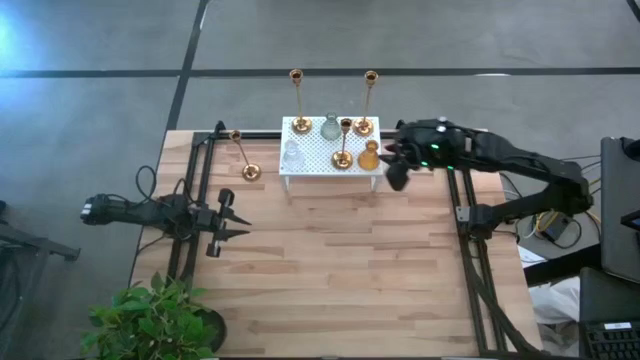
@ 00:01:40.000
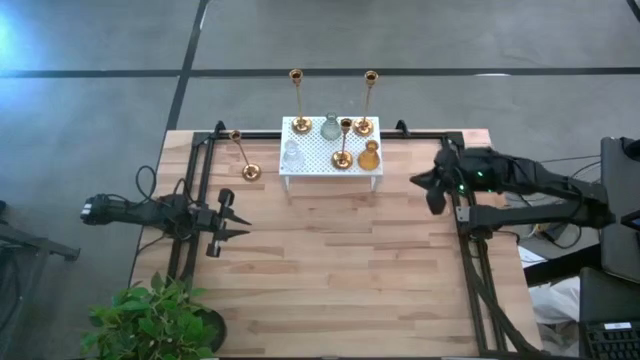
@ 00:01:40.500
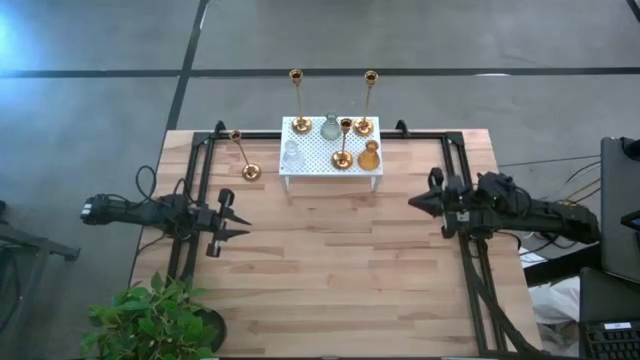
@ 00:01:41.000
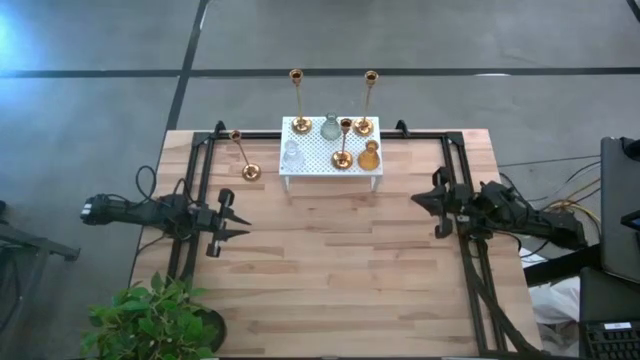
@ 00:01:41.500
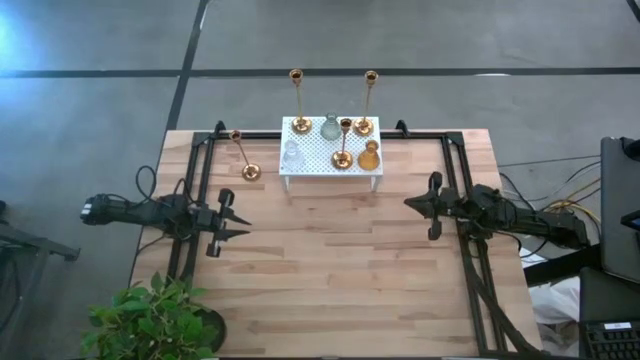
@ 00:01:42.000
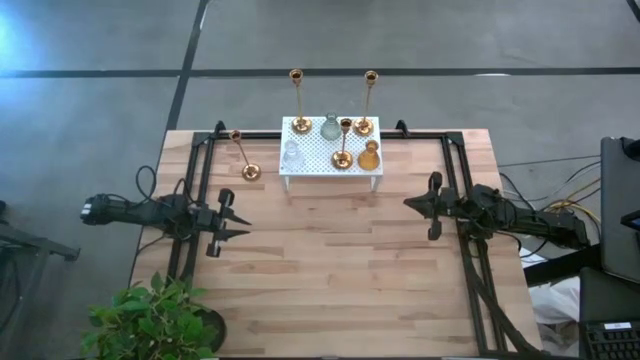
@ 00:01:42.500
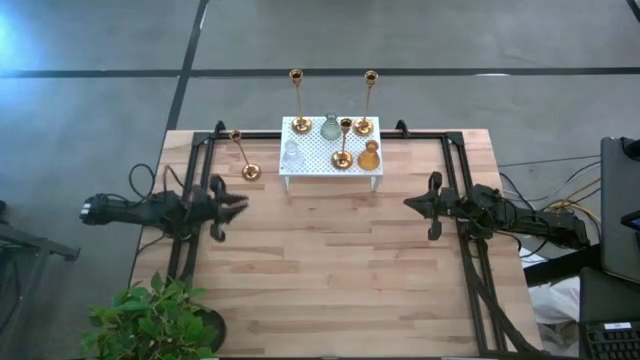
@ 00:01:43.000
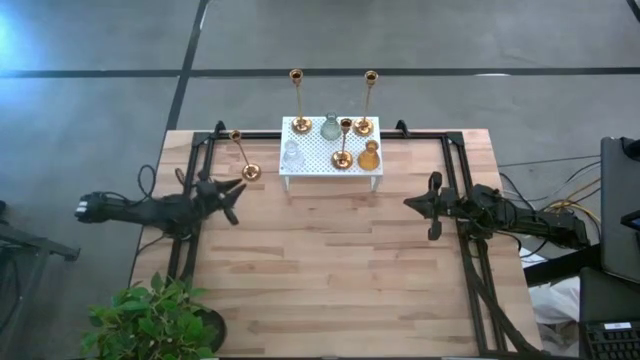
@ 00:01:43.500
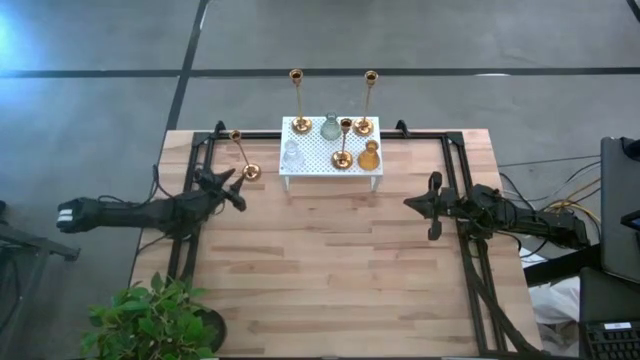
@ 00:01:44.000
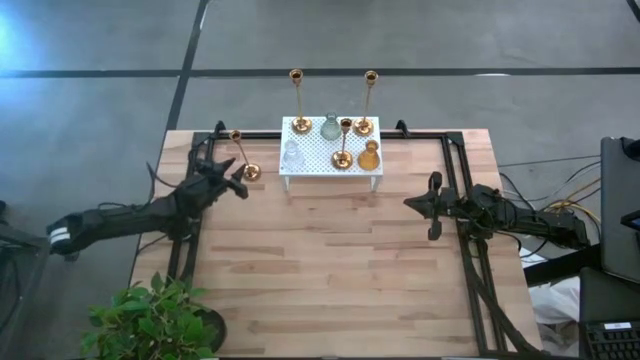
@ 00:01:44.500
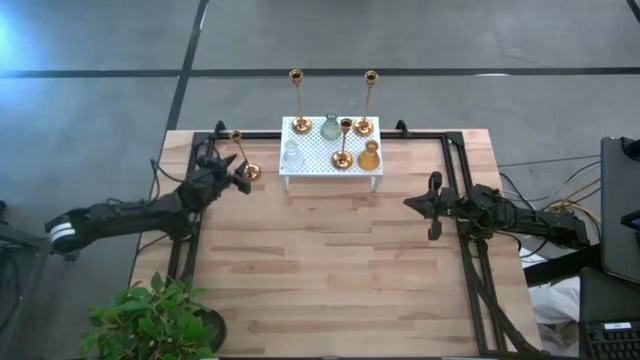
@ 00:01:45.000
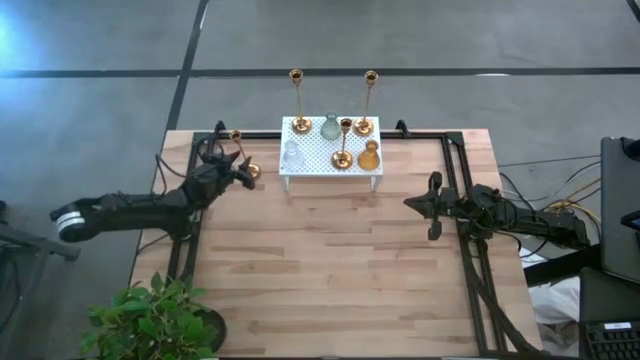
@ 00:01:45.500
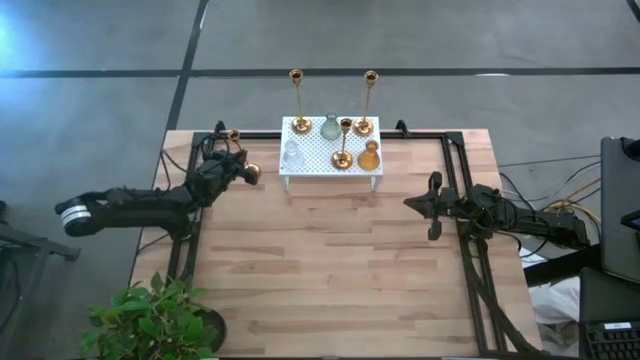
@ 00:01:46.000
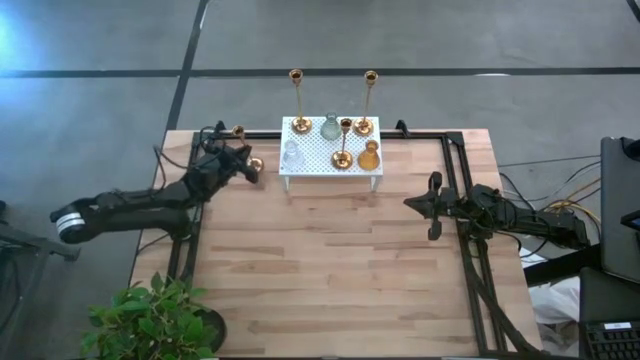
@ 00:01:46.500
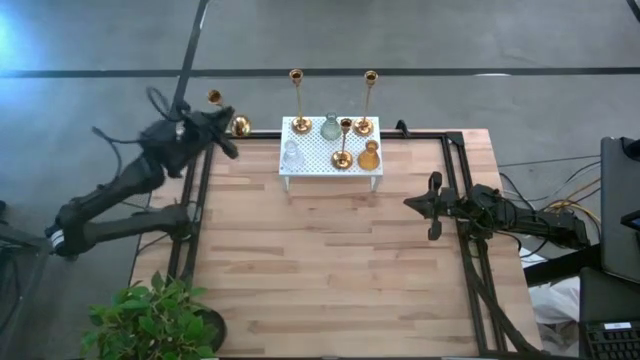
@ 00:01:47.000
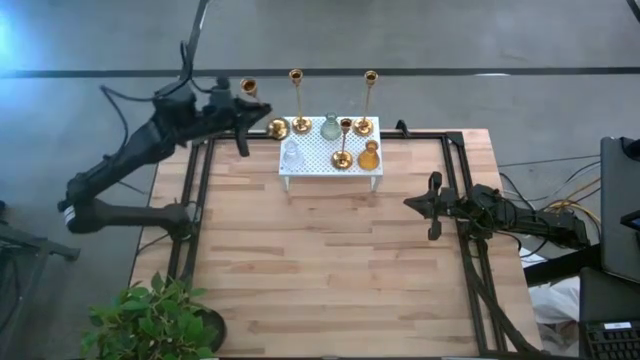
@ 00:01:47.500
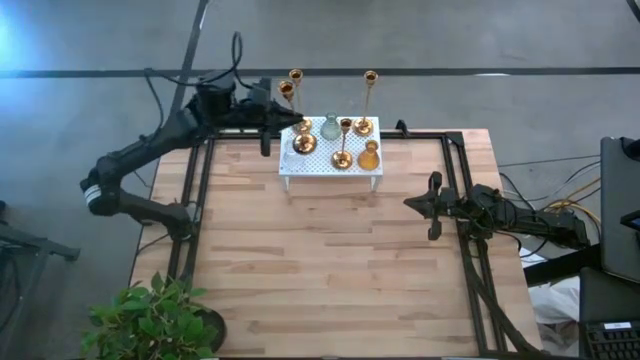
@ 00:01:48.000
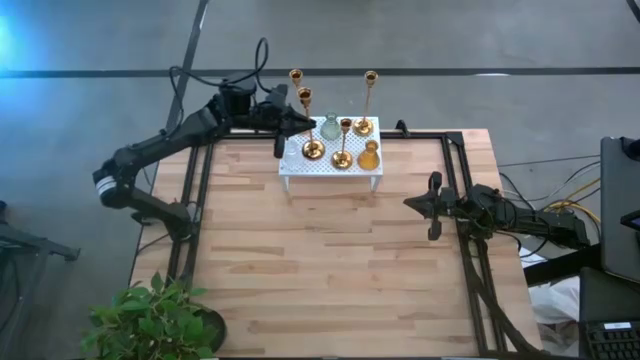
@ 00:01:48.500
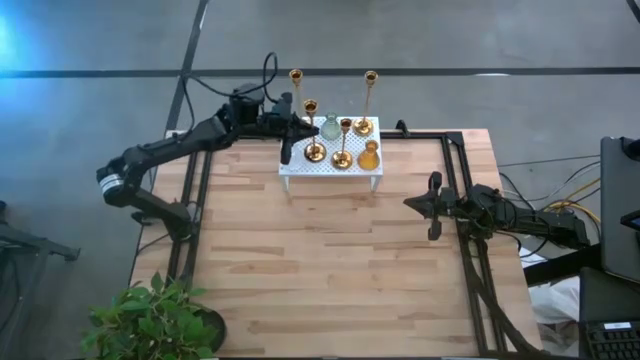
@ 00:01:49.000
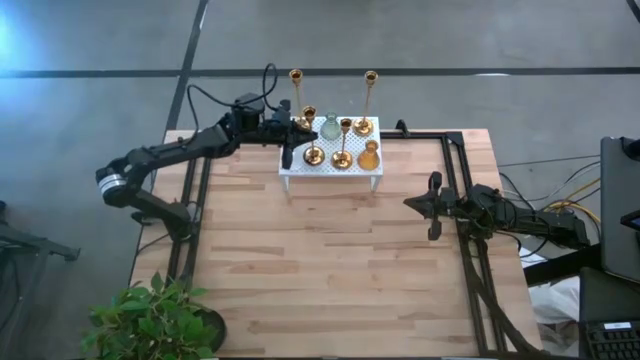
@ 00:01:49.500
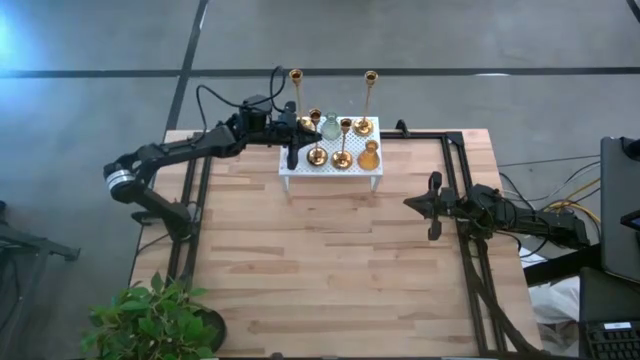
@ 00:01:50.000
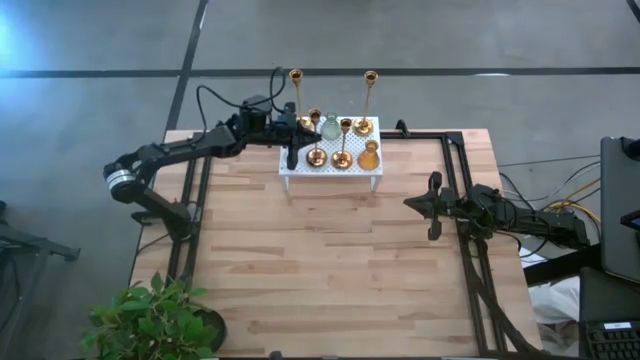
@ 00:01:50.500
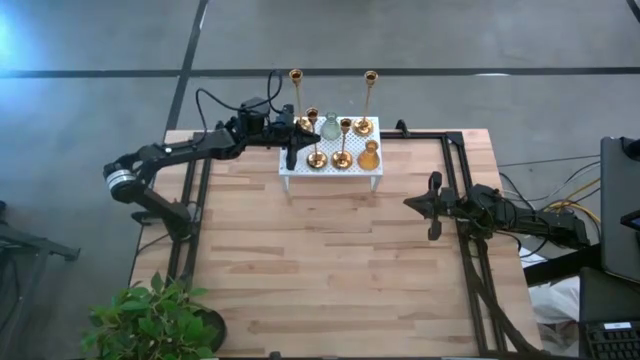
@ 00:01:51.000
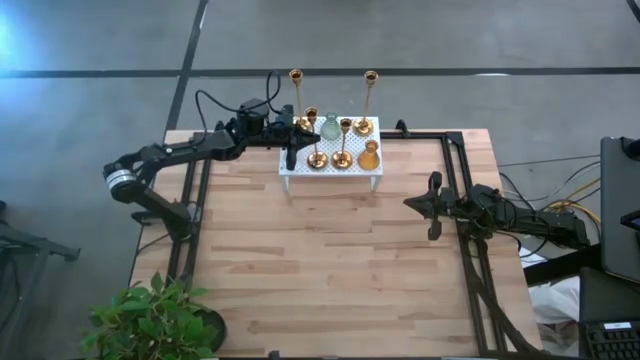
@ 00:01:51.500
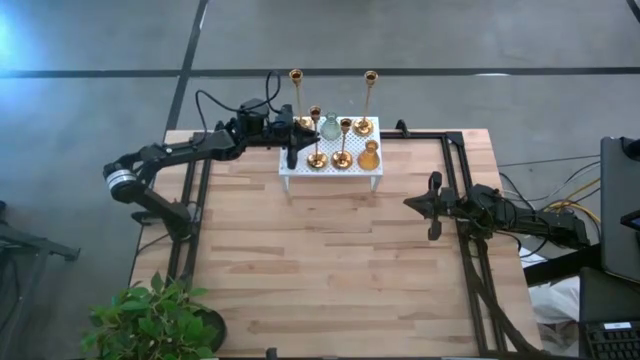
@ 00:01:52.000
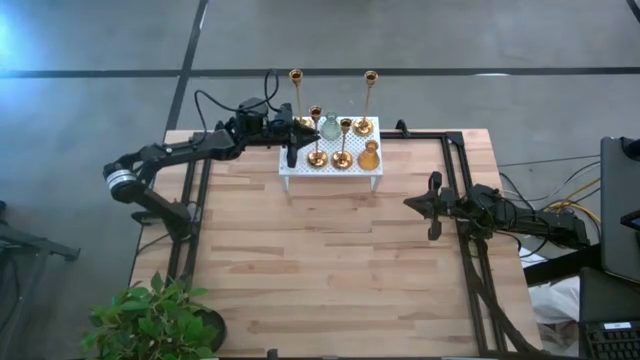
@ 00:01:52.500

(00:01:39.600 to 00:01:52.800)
Task: Pick & Place candle stick holders
Put the gold candle holder on the shelf

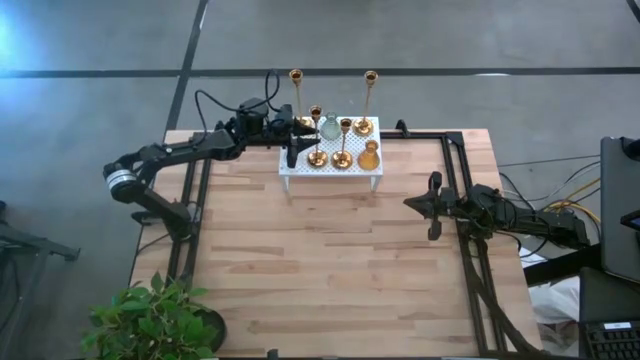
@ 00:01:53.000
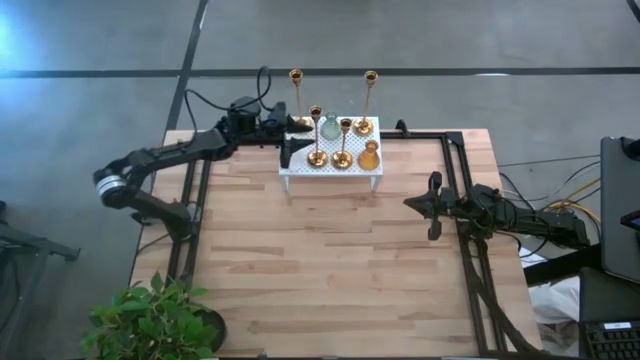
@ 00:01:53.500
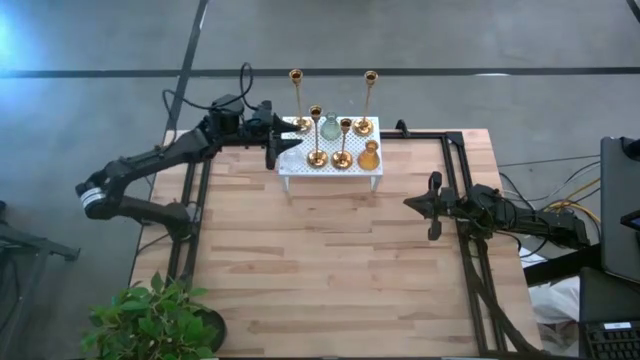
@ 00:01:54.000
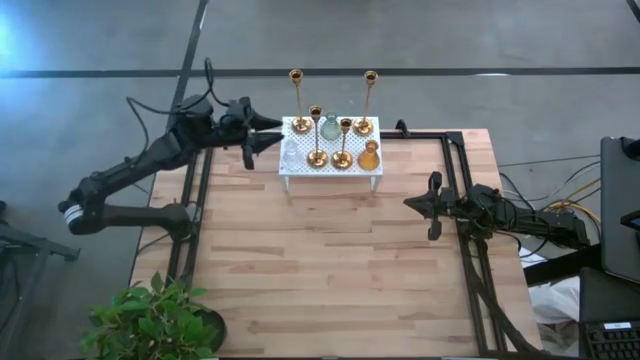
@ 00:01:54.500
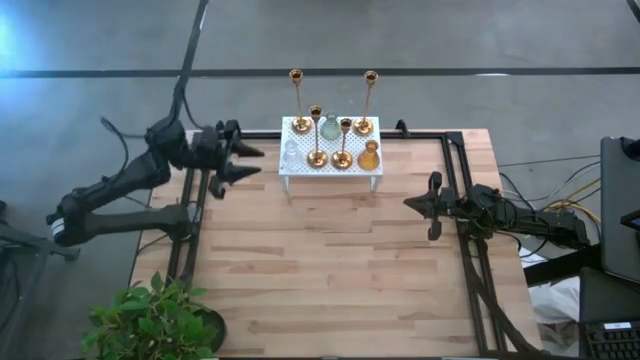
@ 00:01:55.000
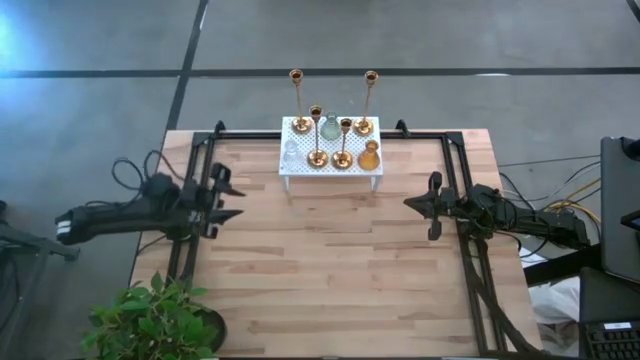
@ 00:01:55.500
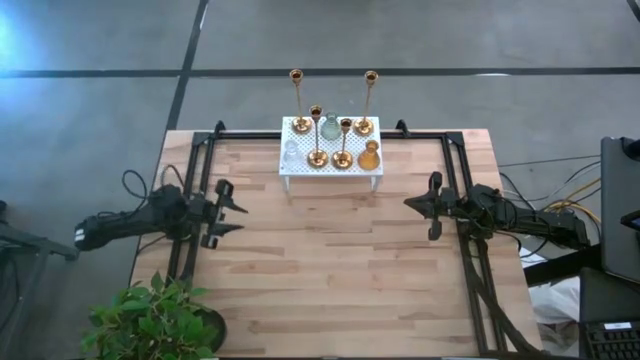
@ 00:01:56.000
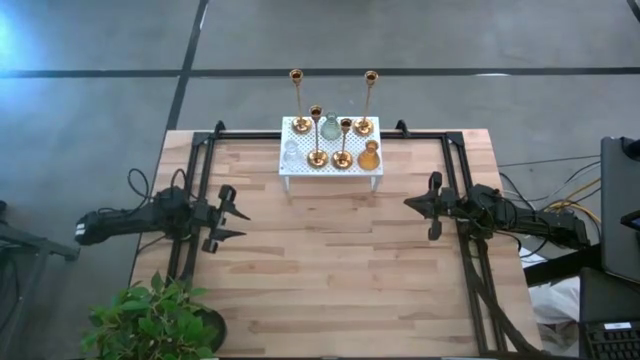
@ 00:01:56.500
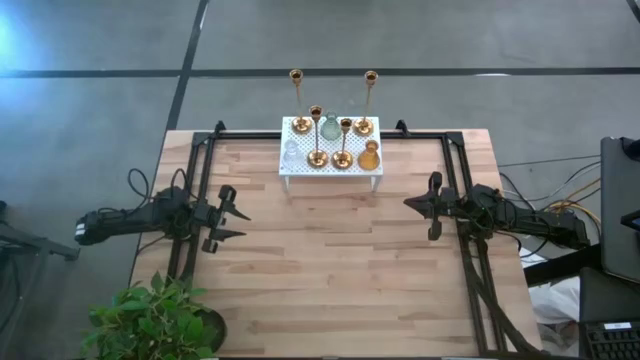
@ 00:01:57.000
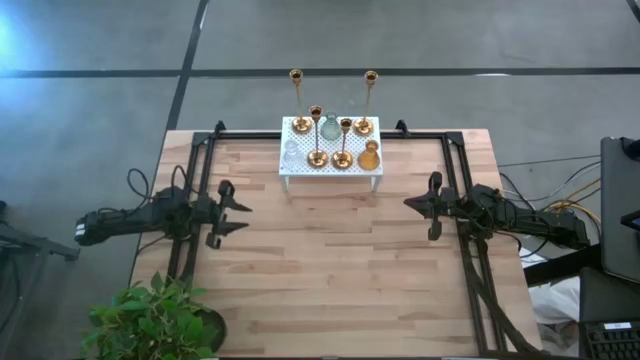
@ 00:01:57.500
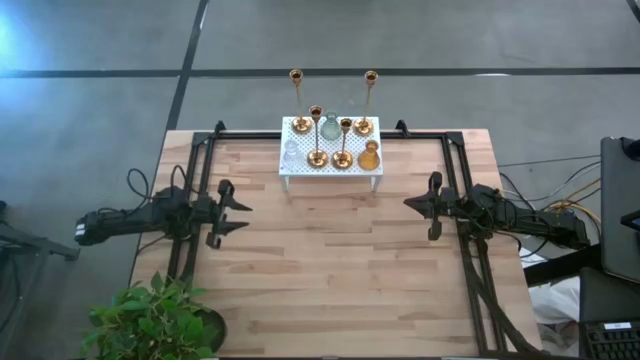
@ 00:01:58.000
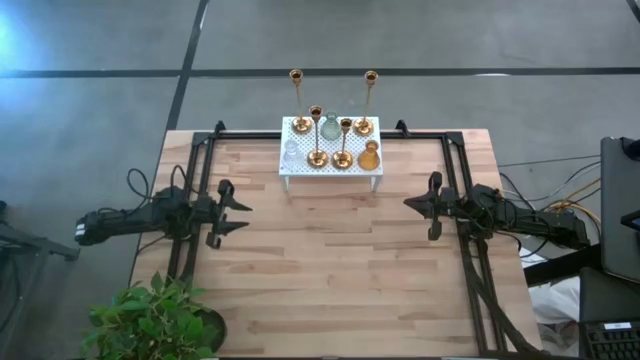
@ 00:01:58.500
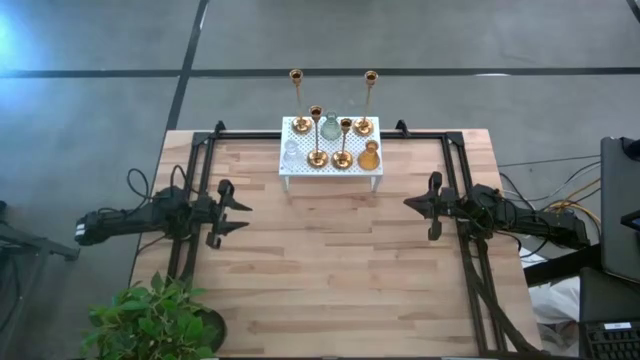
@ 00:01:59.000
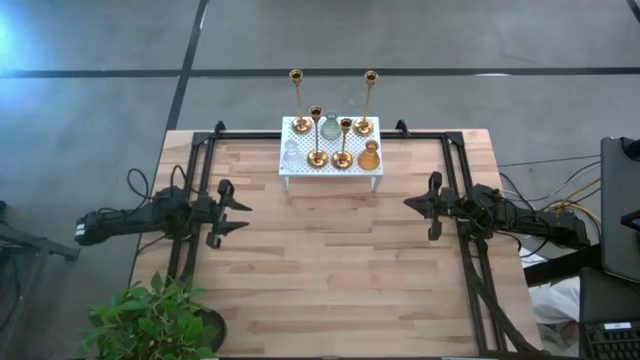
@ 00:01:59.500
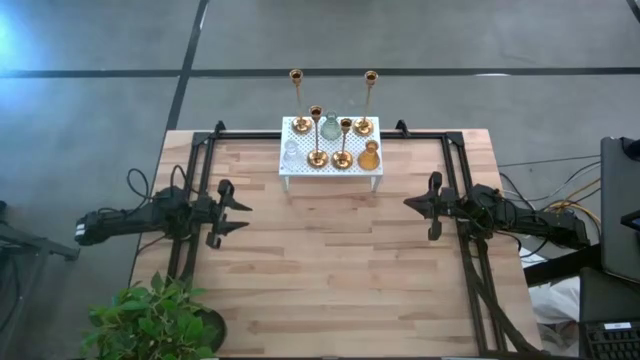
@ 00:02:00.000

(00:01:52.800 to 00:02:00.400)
Return to Home Position

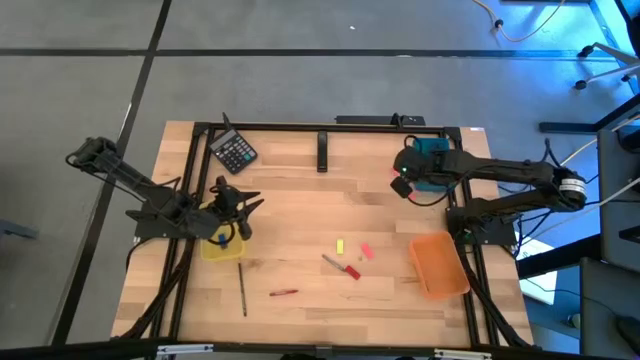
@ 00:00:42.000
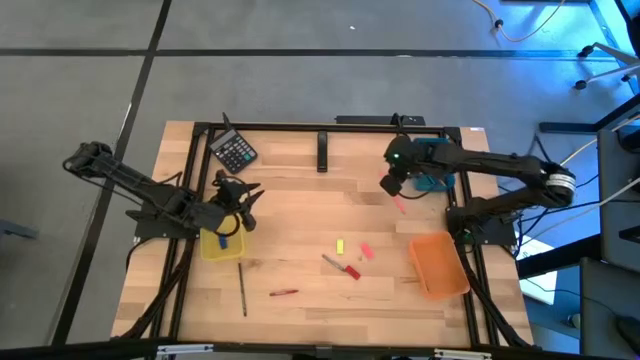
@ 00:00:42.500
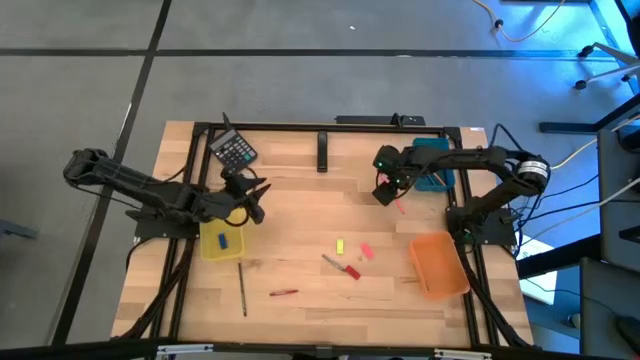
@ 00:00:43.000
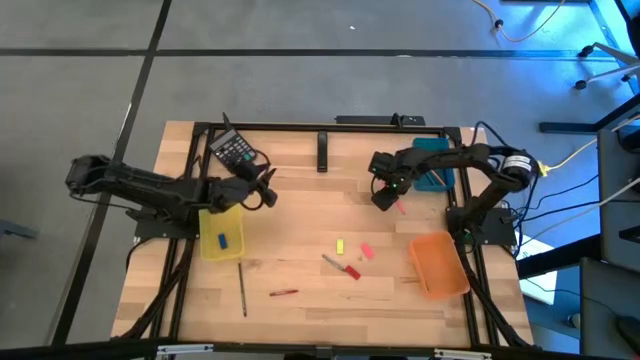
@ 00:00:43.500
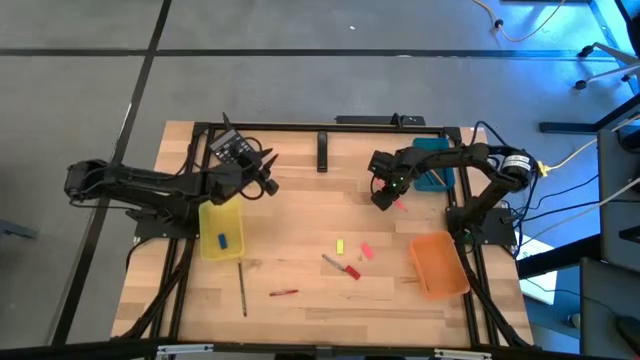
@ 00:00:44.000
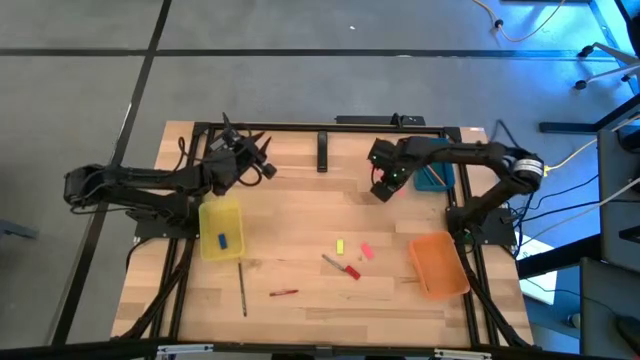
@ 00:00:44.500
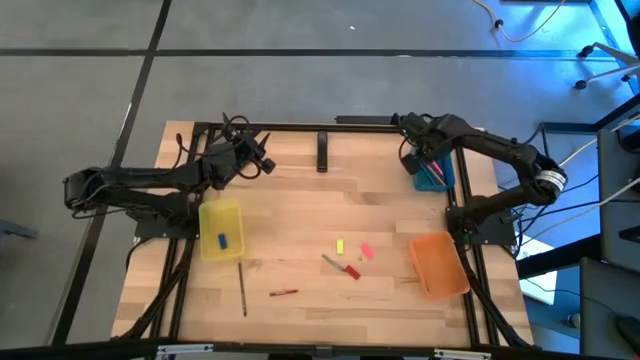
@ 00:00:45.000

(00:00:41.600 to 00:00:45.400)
Task: Sort crayons/erasers/pens/pencils in bins
Put the pink pencil into the blue bin
